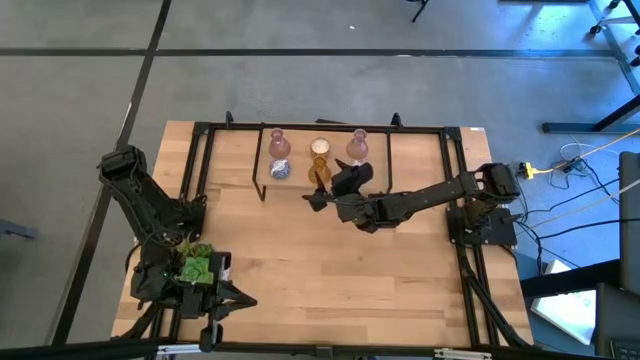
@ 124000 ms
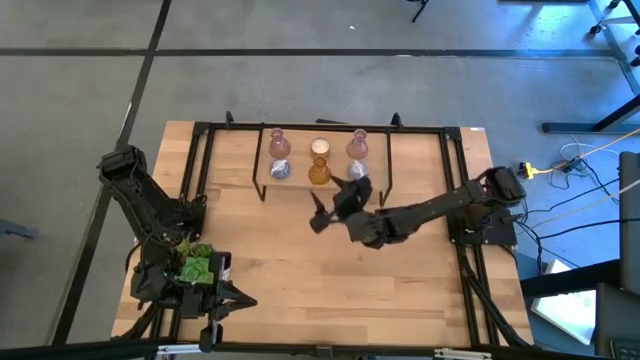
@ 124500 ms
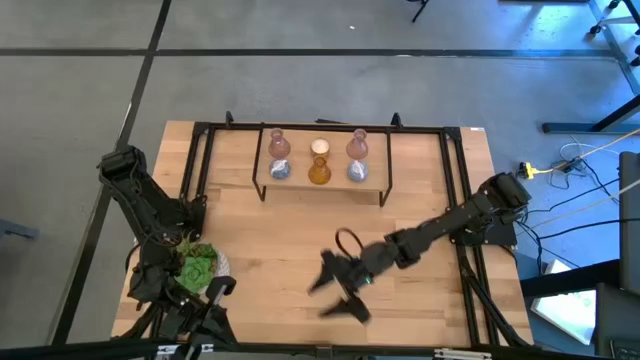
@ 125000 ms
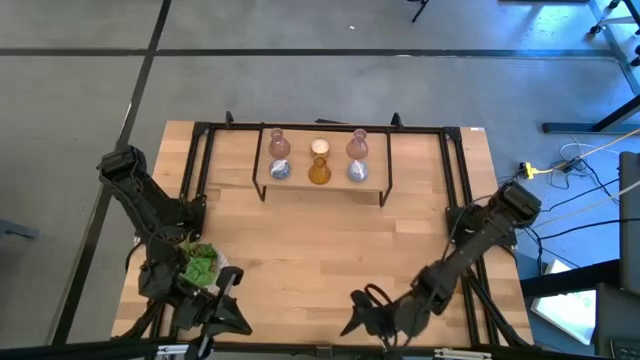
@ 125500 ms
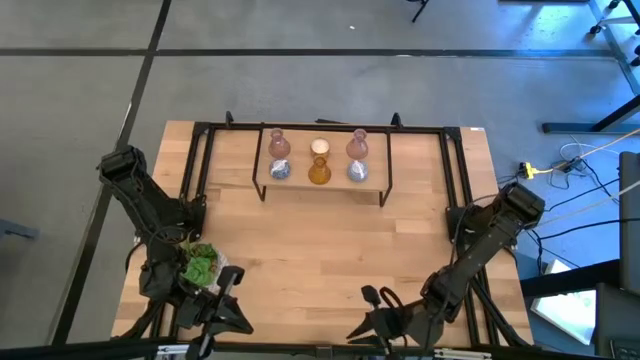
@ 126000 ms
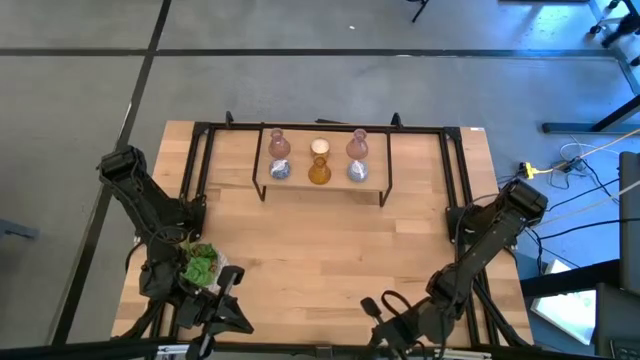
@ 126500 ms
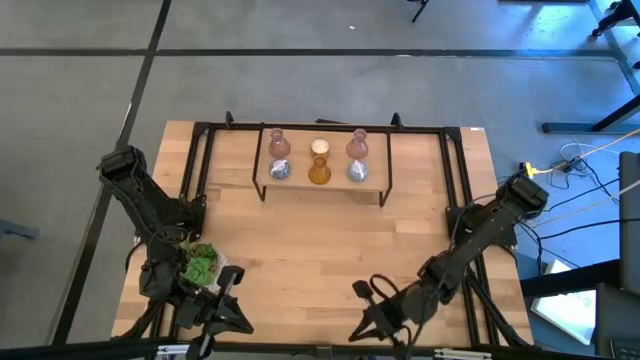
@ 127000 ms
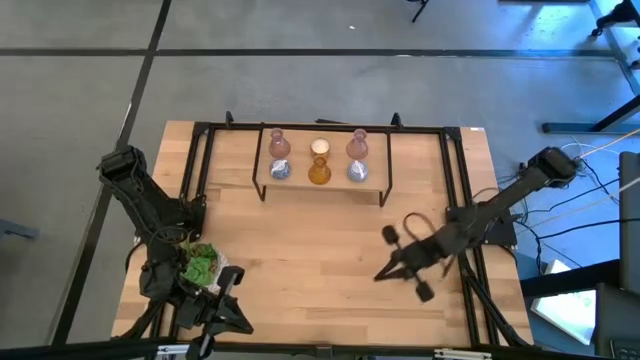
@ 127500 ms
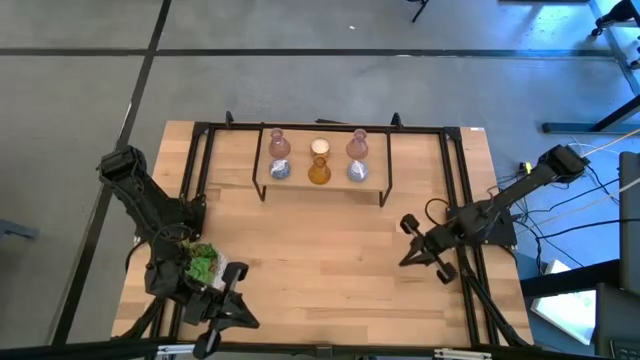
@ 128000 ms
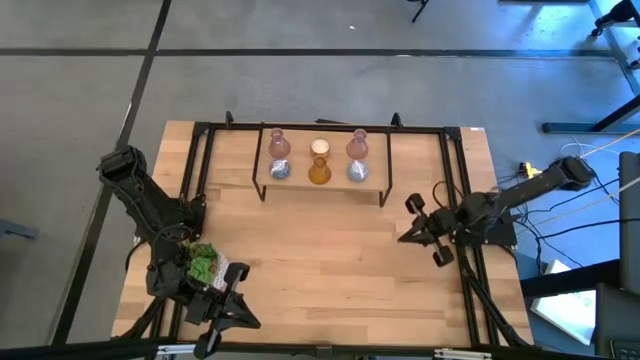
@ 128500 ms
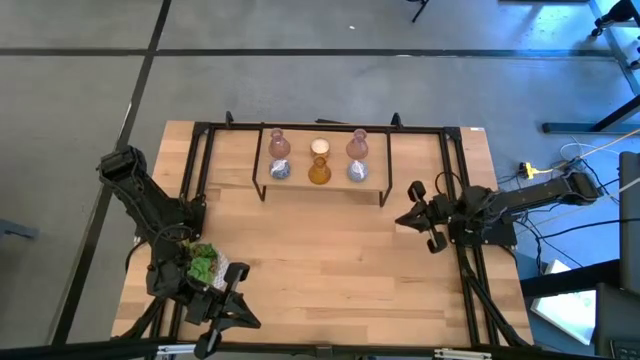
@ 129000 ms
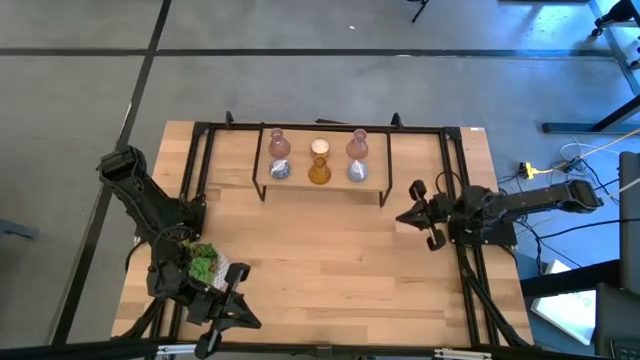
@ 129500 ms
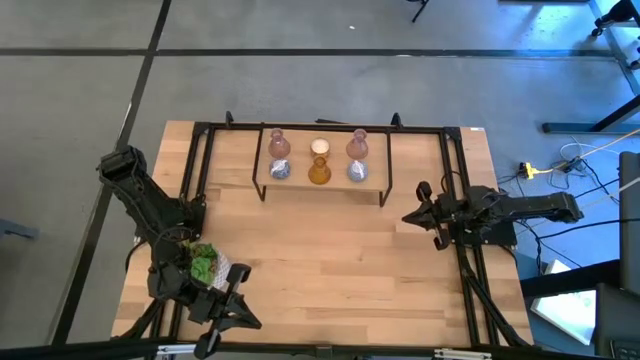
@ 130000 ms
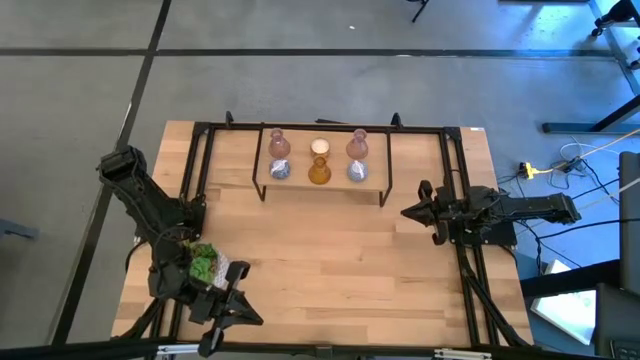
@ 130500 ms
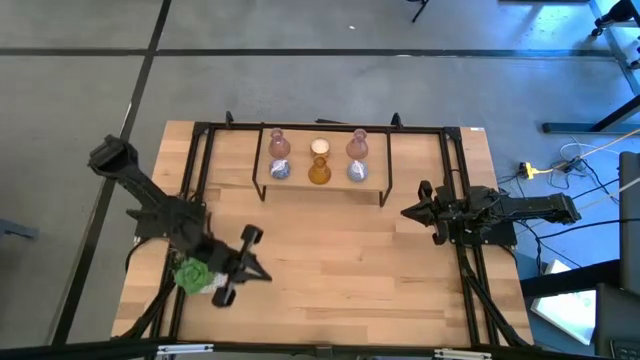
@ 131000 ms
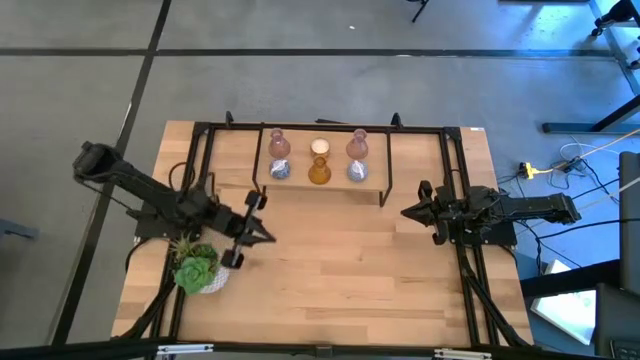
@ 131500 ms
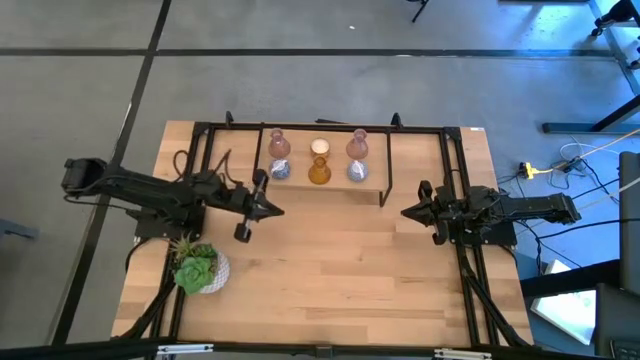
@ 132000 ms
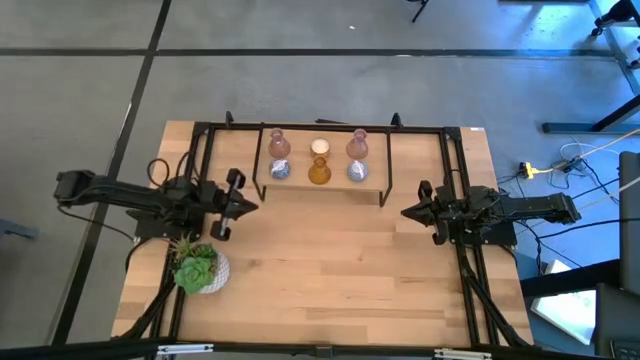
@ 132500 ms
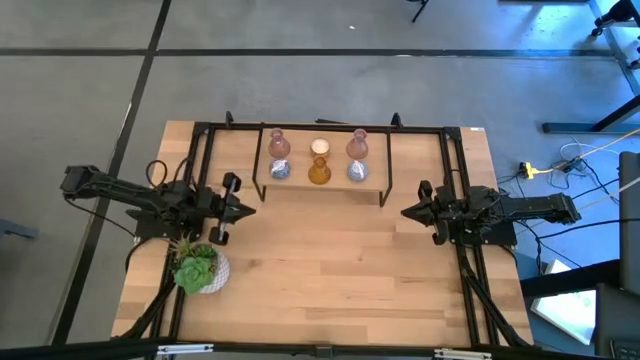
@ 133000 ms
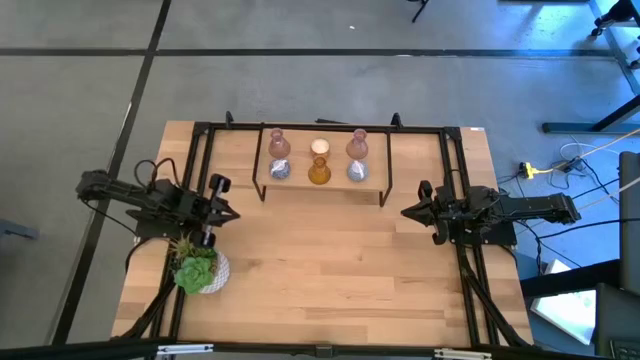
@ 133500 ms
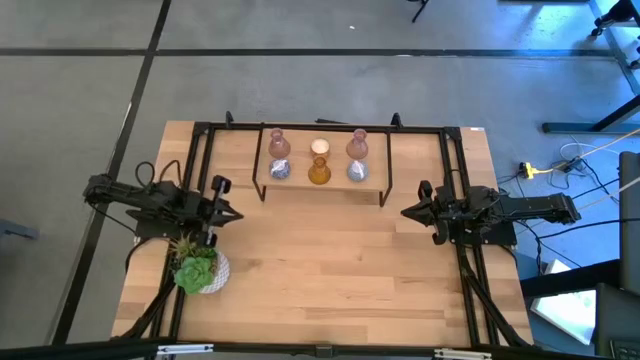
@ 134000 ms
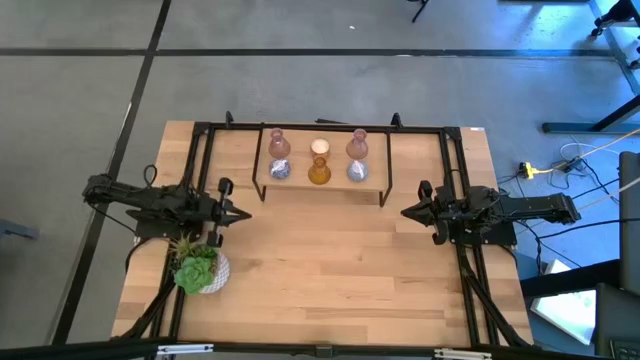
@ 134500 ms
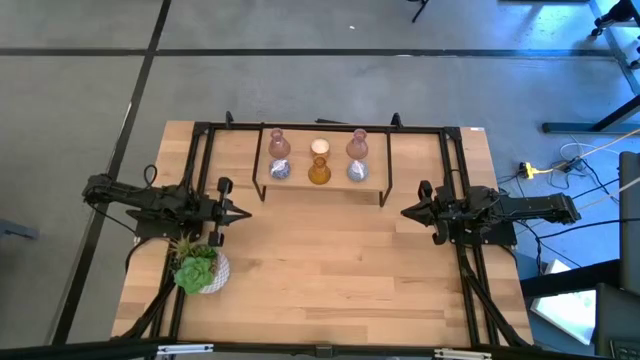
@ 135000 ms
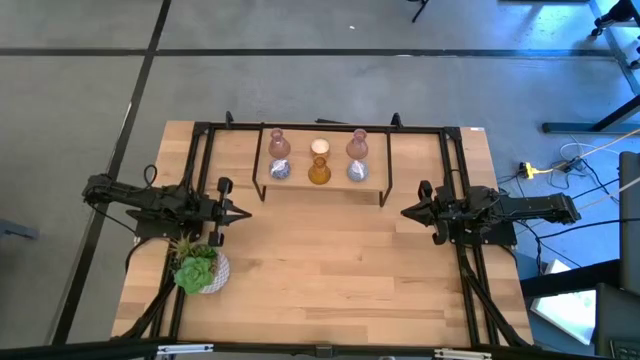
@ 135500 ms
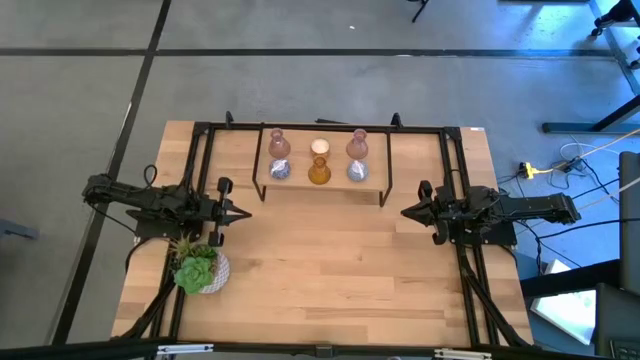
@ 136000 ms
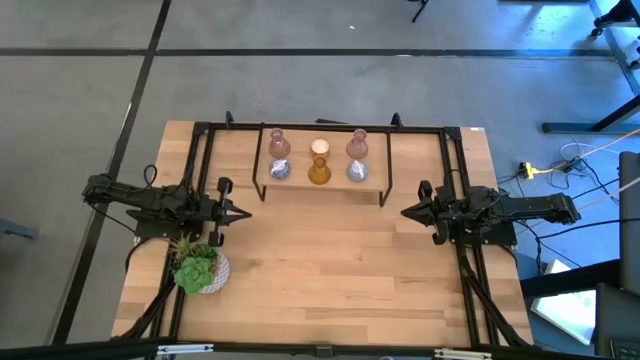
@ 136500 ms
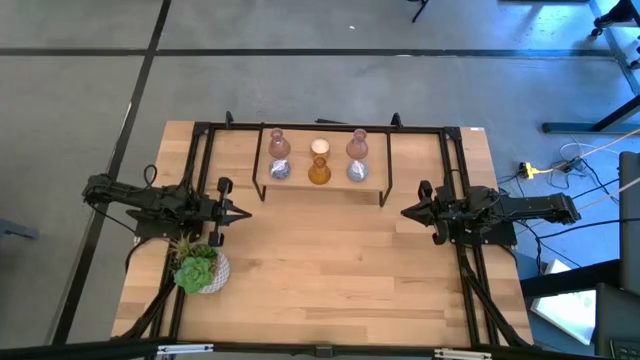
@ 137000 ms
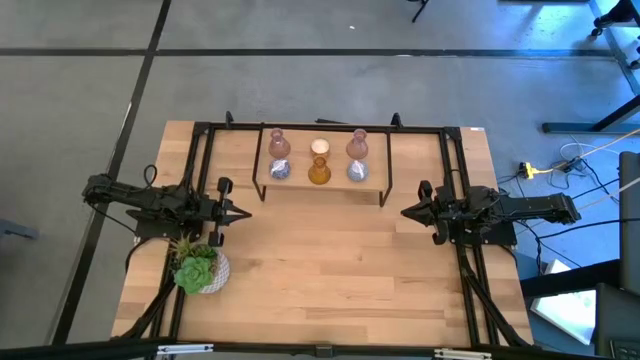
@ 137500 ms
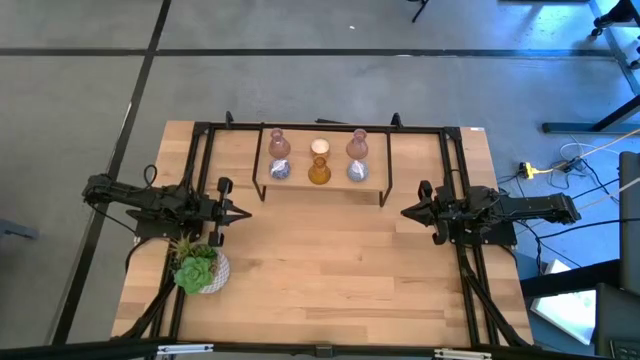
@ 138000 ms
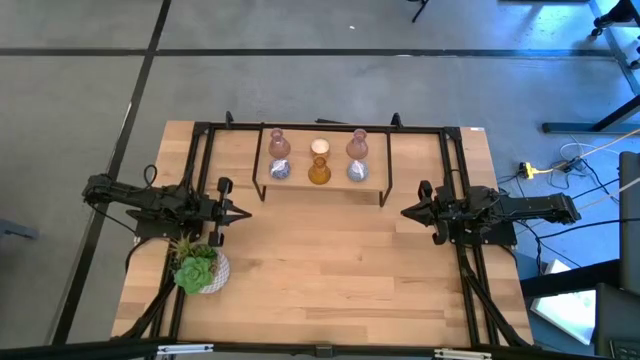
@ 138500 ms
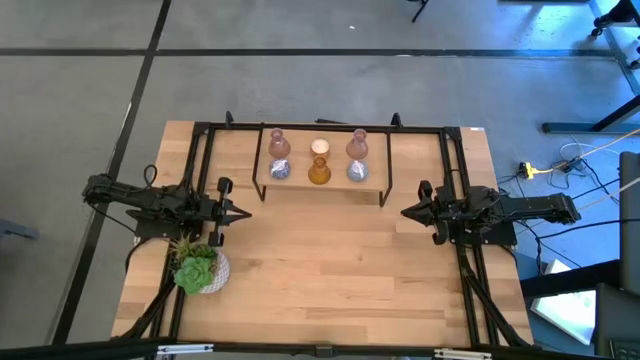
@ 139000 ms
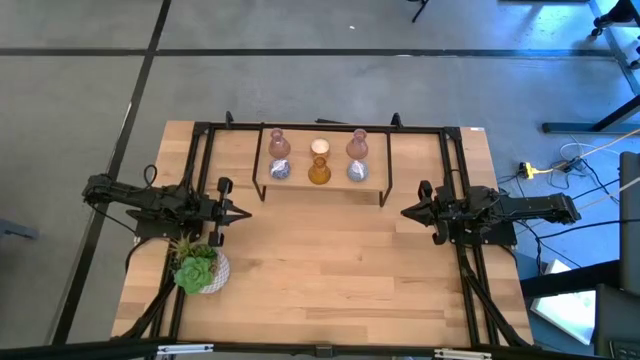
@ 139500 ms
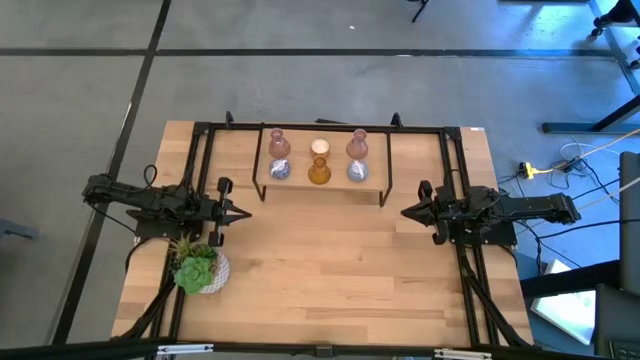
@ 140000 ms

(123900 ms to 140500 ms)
Task: Pick & Place candle stick holders
Return to Home Position

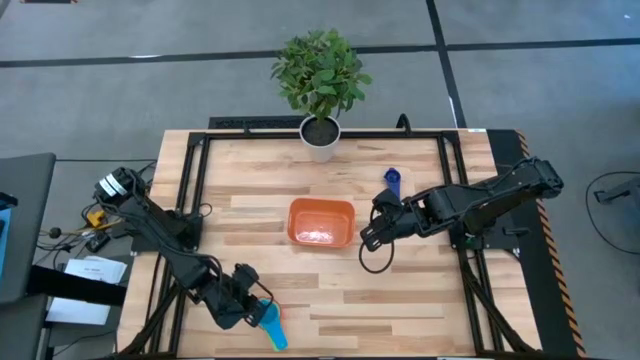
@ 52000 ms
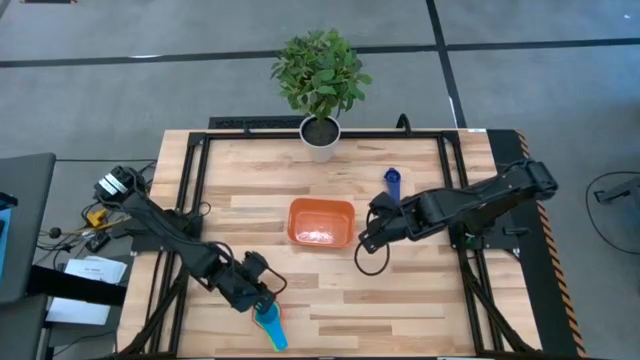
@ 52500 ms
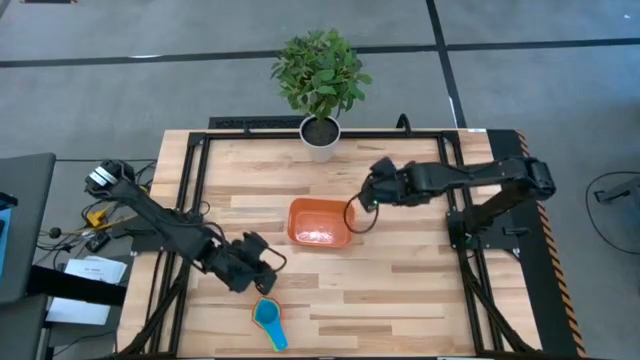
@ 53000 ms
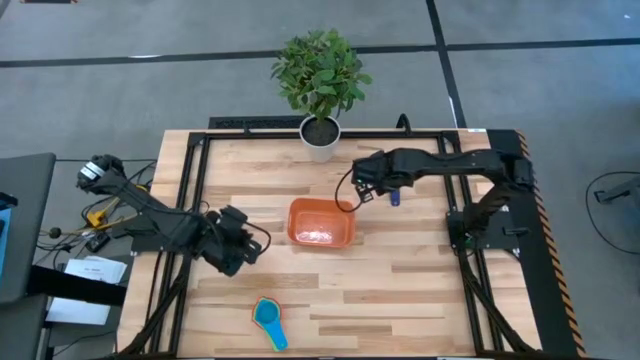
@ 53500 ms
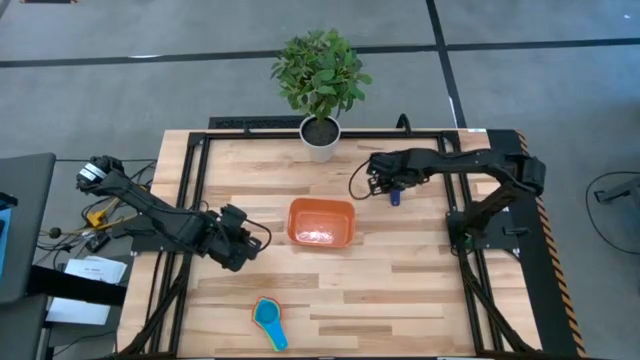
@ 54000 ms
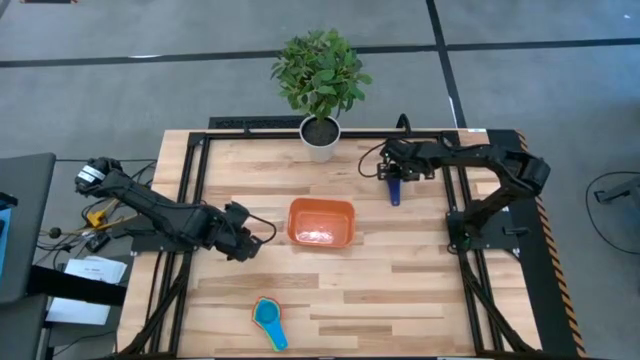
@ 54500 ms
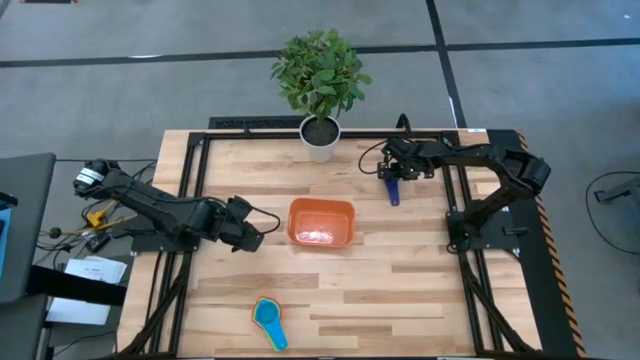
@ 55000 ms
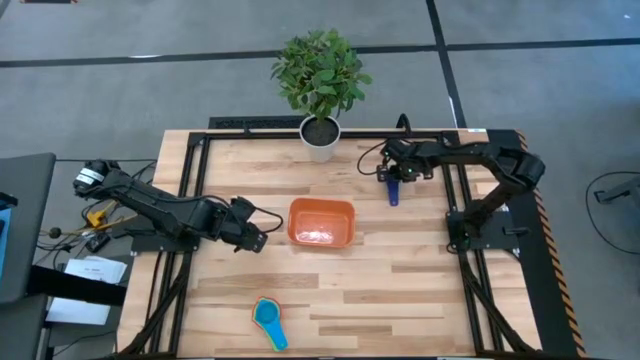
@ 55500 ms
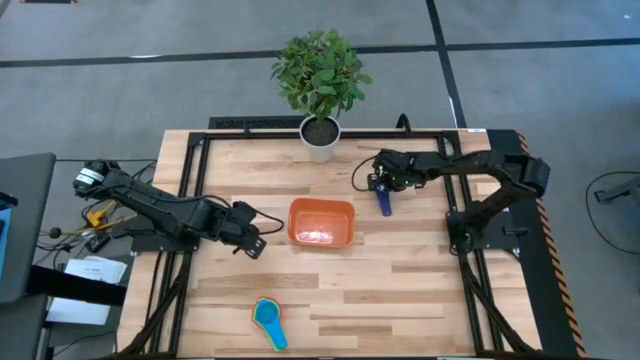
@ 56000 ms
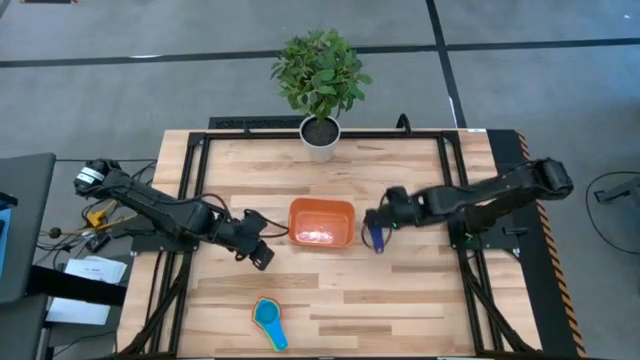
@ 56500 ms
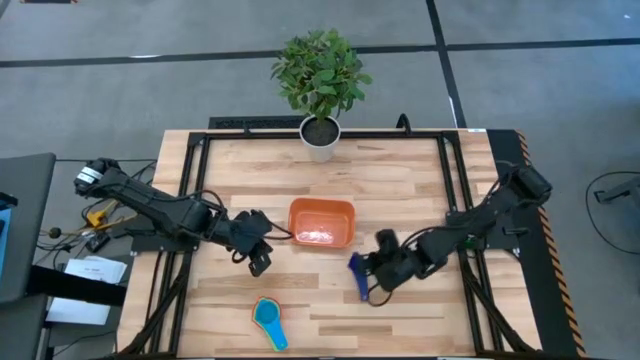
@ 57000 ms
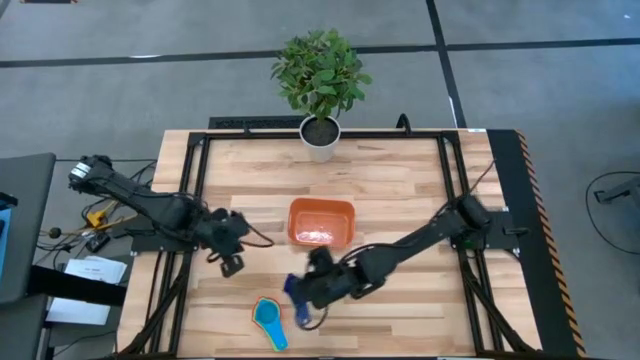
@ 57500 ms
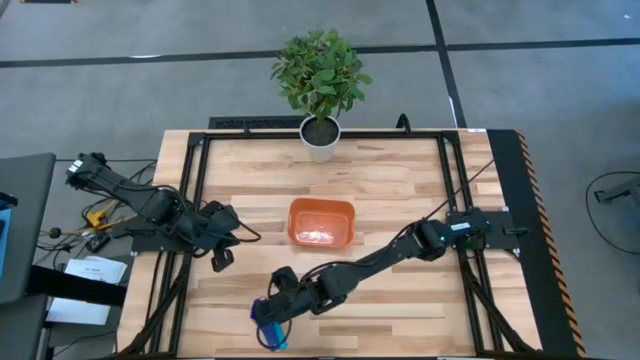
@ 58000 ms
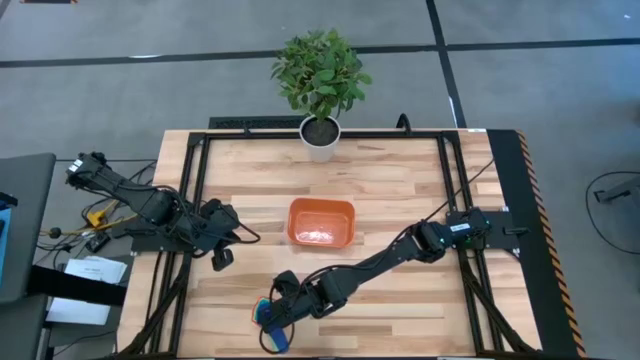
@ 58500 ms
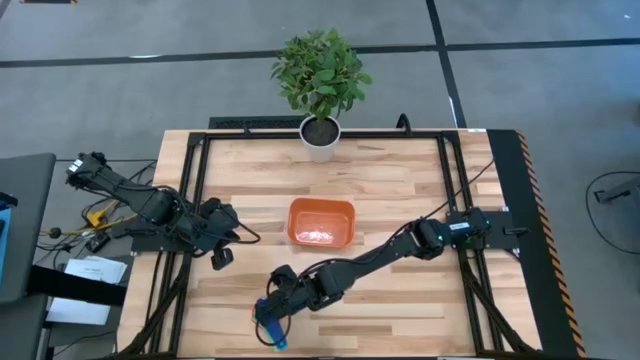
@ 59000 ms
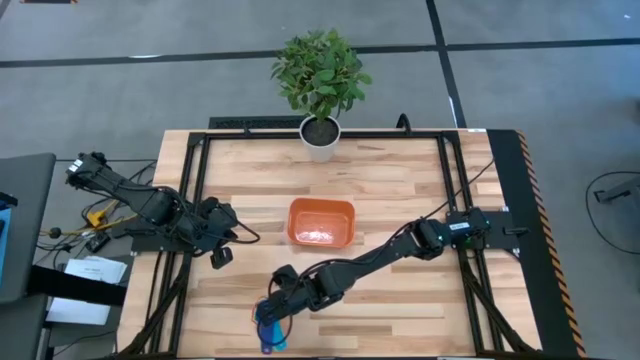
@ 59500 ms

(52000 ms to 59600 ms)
Task: Nest measuring cups in basket
Stack the dark blue measuring cup on top of the light blue measuring cup
